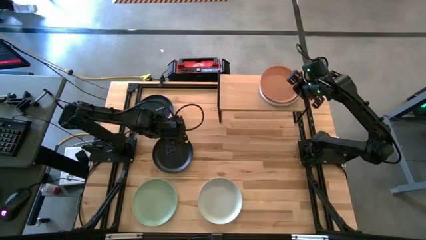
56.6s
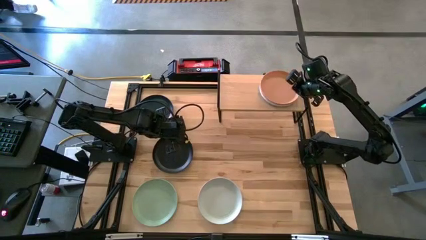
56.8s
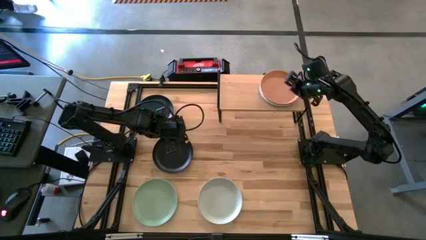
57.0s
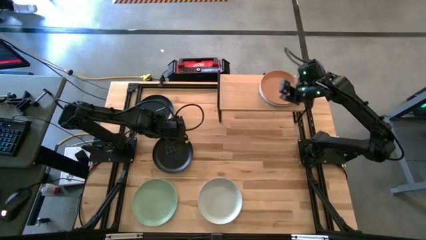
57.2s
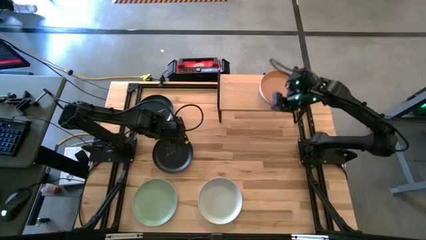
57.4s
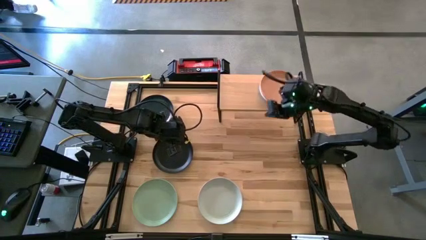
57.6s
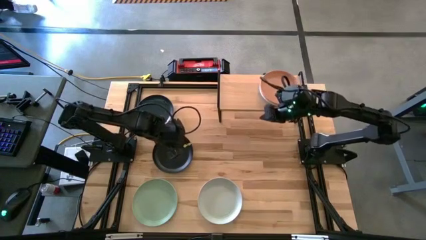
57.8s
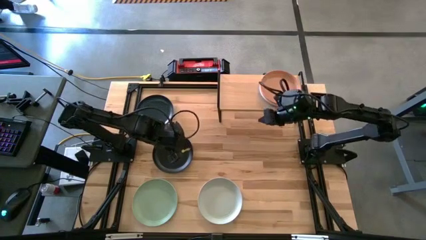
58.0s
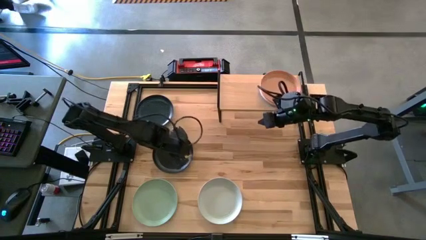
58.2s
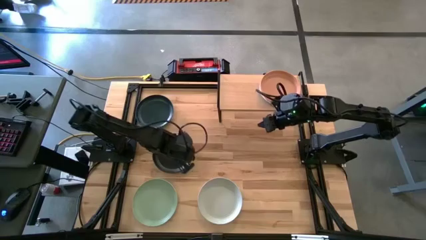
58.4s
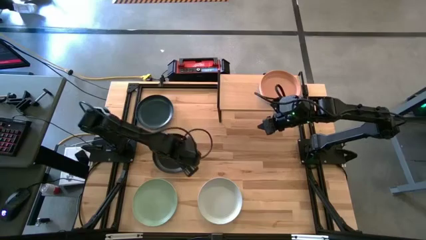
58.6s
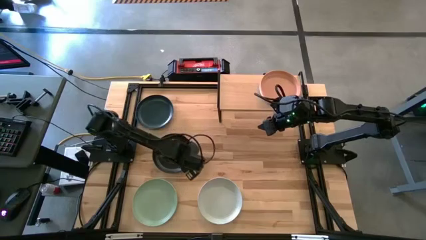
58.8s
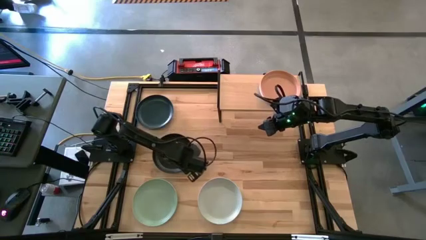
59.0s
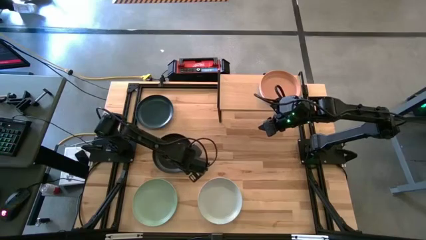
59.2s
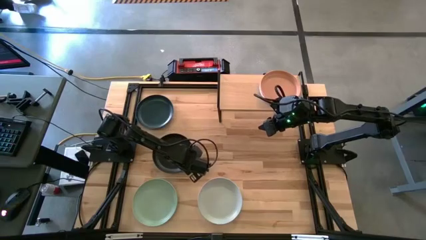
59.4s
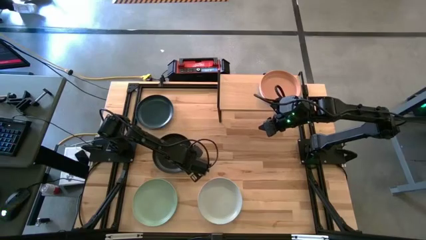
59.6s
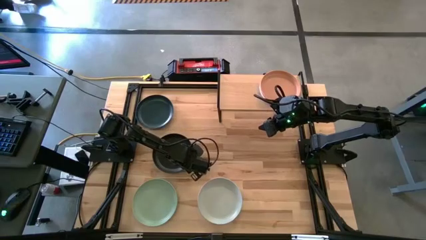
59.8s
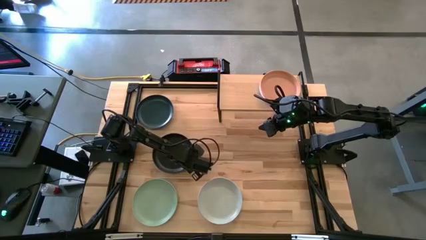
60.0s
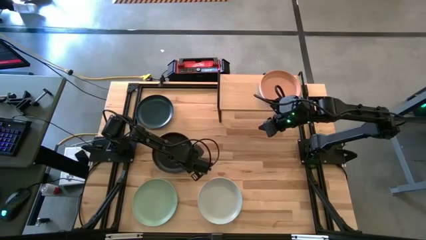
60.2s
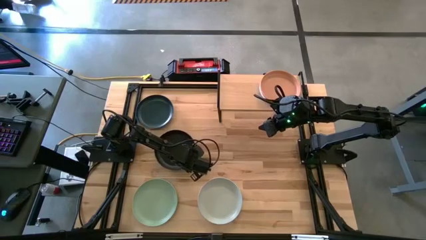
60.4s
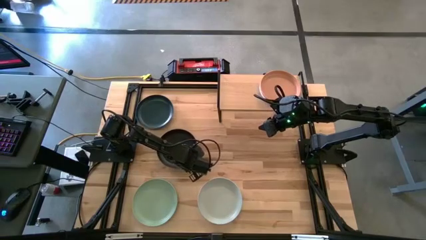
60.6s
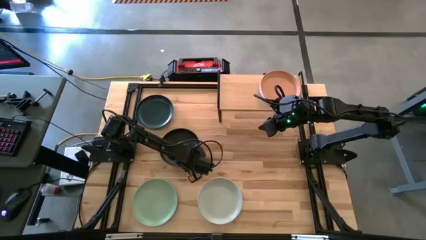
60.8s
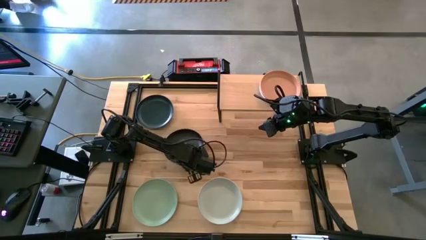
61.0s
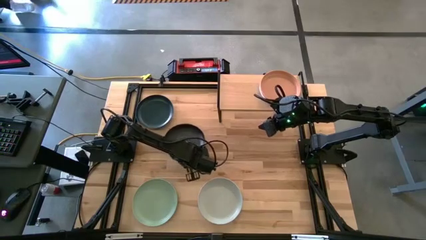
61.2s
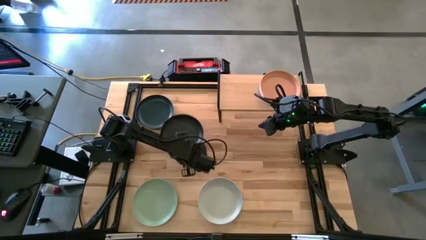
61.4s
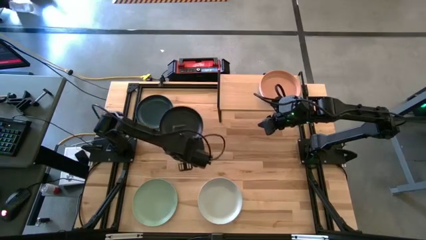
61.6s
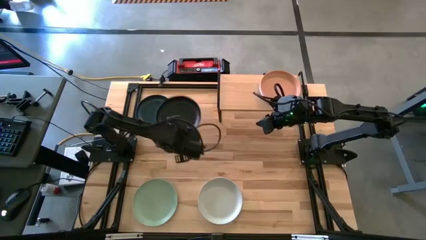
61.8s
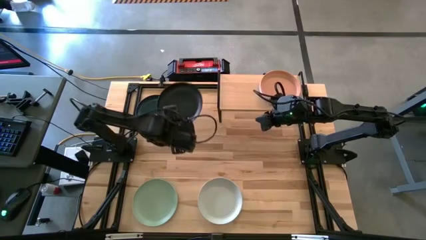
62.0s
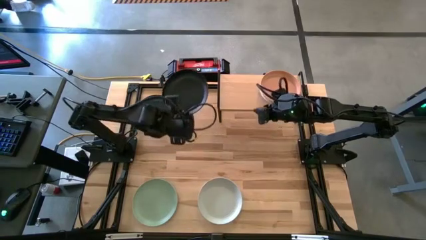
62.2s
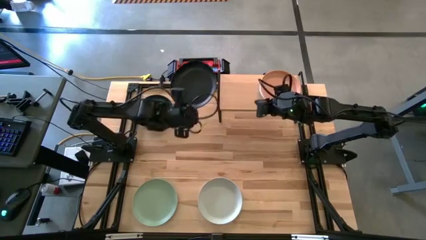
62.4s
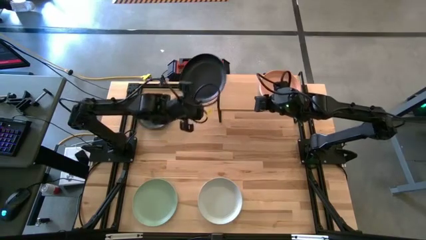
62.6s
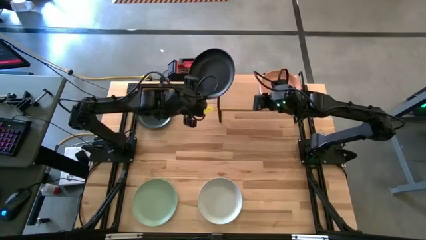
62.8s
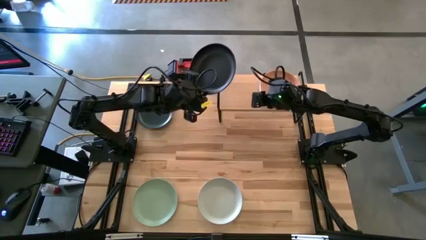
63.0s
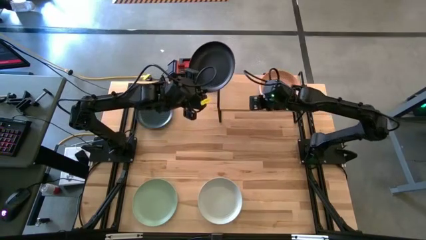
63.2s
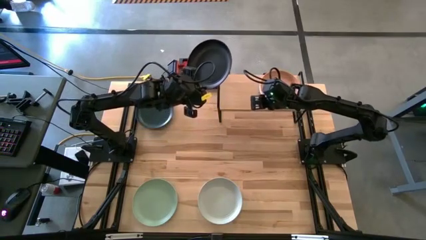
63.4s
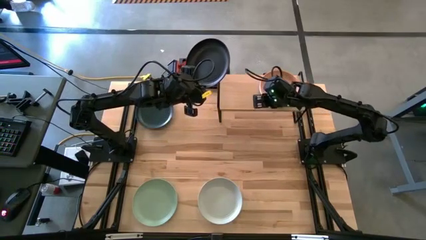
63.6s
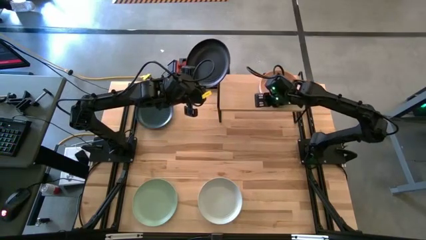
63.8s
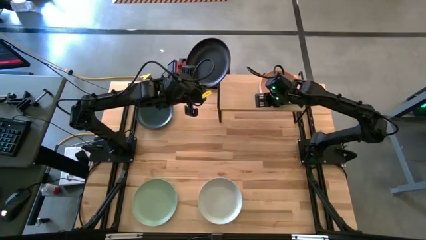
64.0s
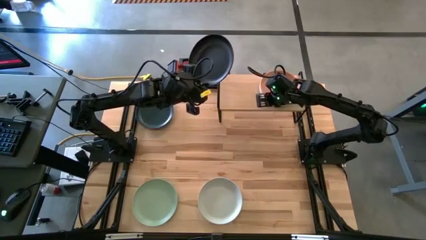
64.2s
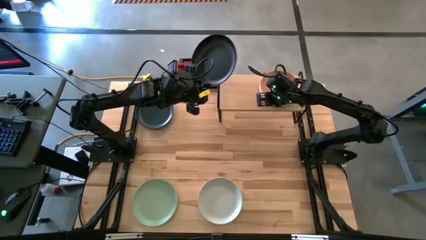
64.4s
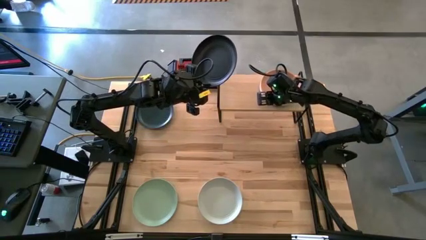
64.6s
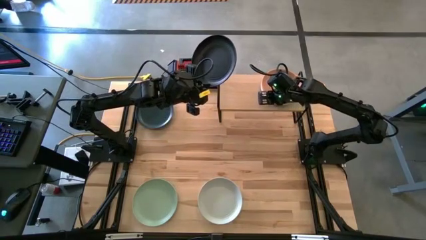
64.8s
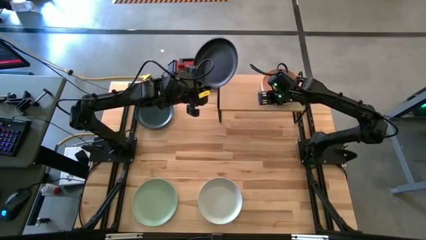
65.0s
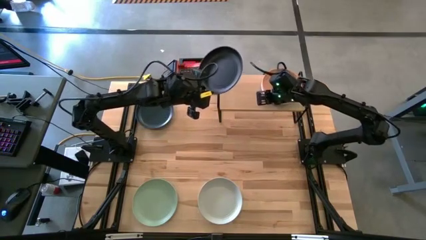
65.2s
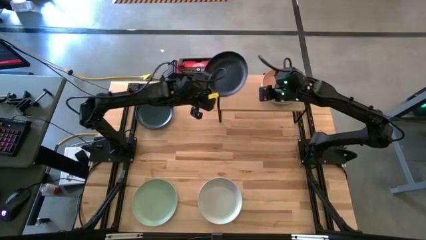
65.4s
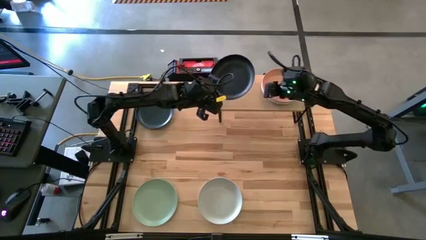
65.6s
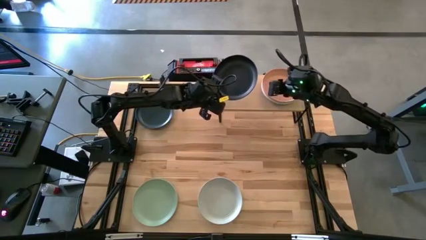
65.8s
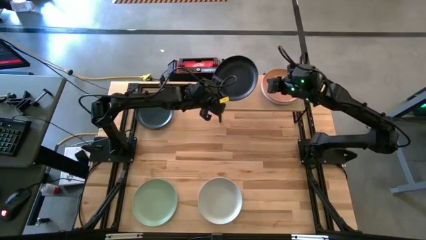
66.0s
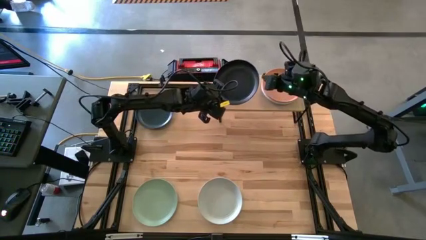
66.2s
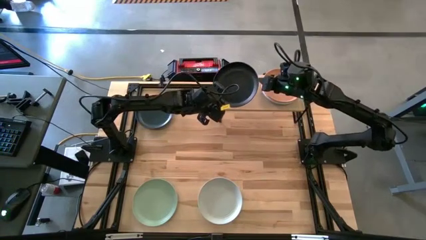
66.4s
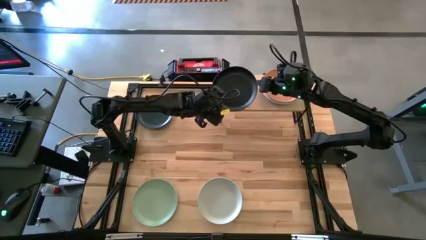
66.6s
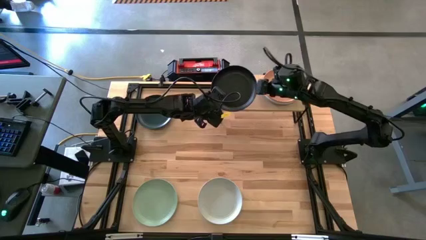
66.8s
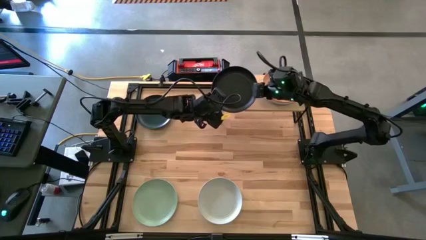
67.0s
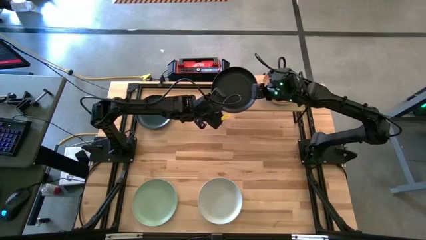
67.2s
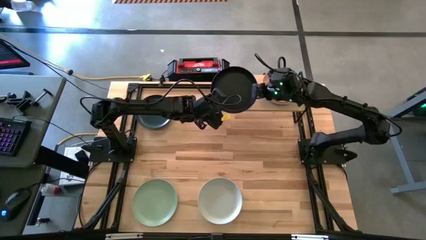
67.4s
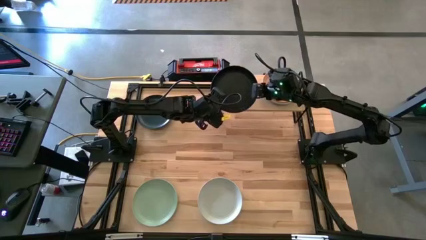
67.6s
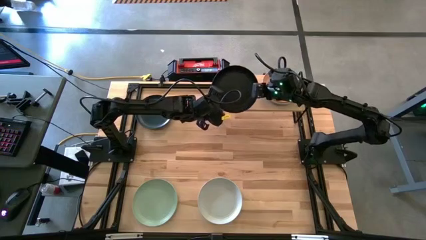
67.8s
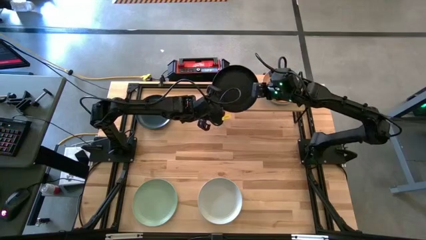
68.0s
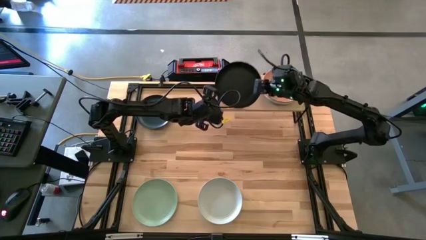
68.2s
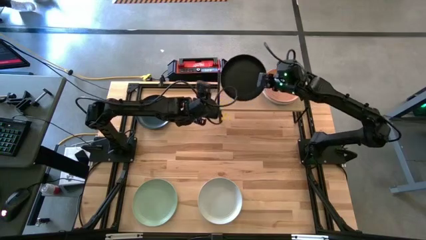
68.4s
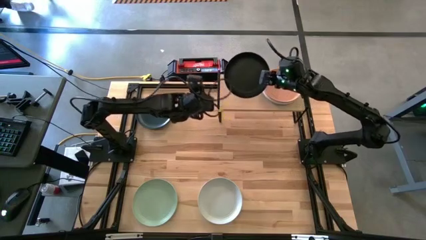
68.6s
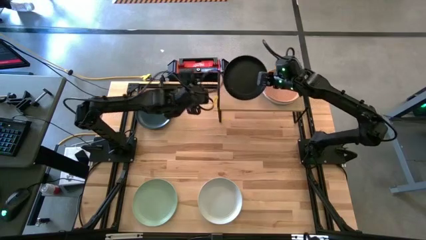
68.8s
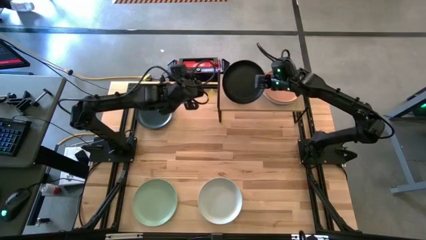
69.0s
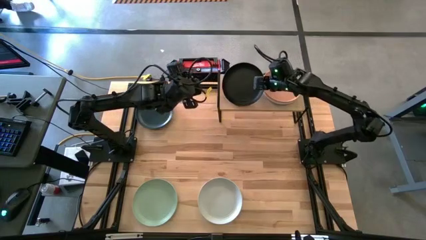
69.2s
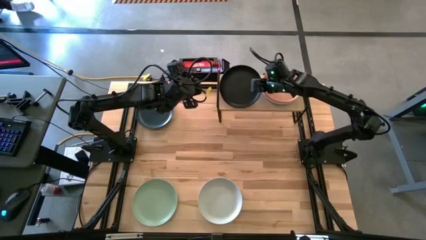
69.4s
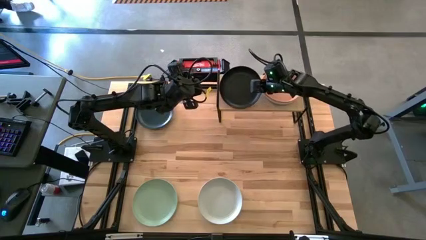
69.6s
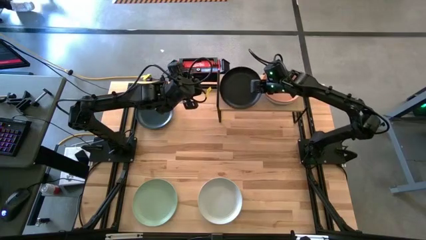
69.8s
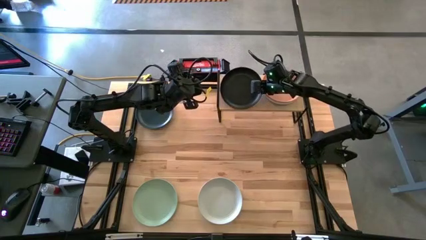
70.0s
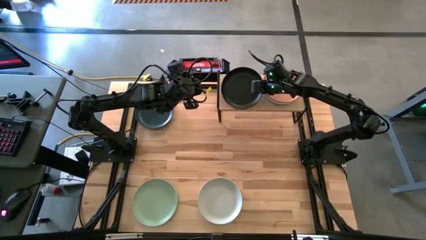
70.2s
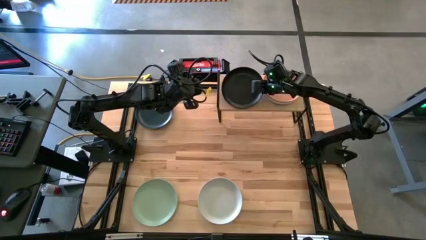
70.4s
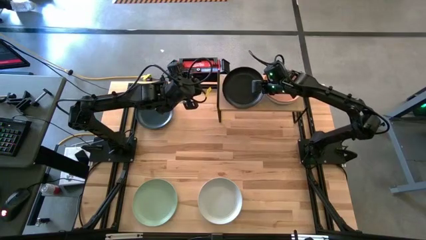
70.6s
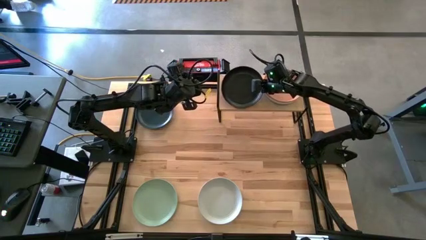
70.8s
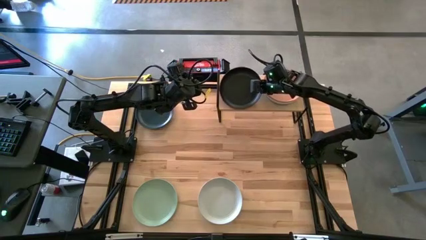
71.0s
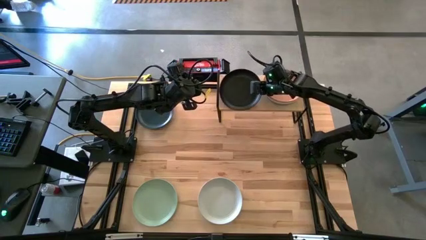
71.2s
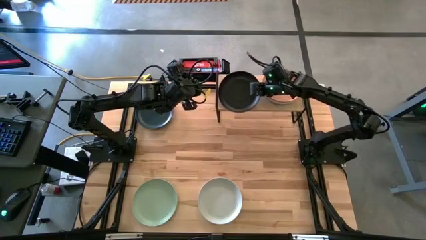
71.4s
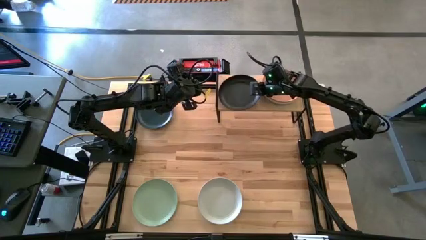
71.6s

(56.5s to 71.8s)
Task: Place and stack plates onto a shelf
Put the bottom black plate on the shelf

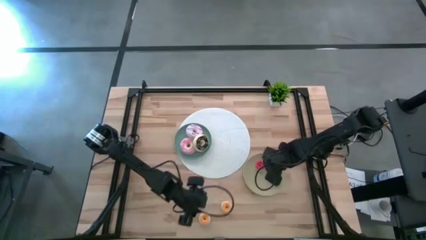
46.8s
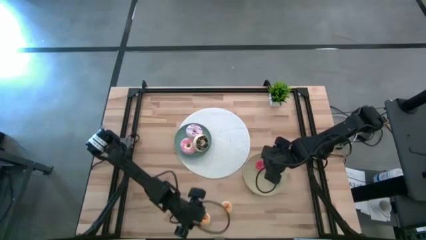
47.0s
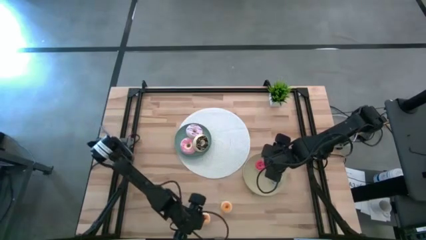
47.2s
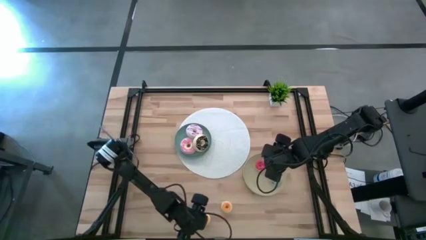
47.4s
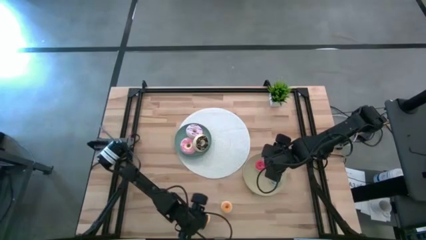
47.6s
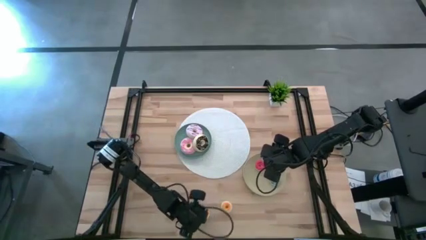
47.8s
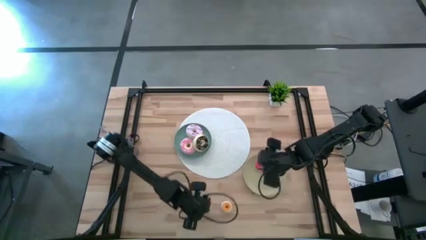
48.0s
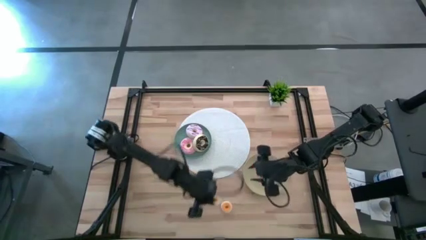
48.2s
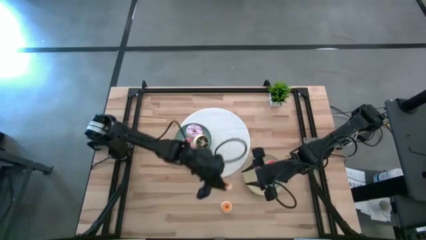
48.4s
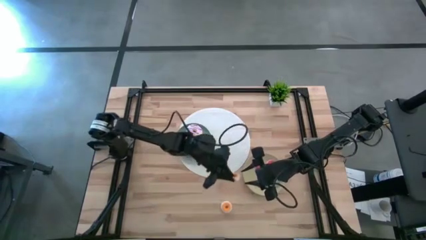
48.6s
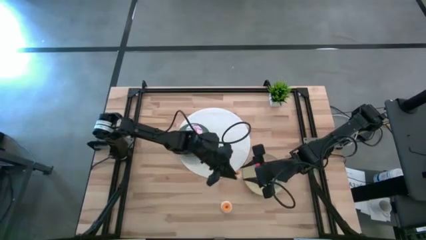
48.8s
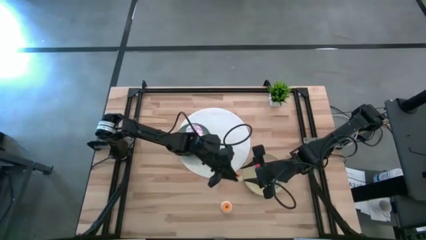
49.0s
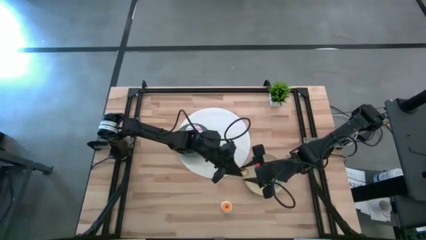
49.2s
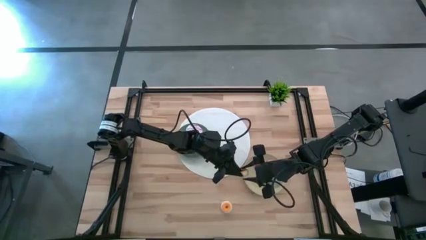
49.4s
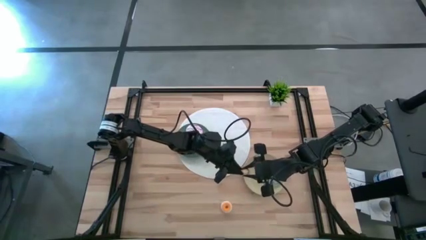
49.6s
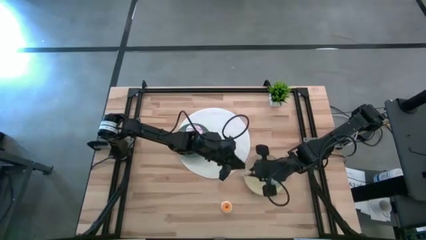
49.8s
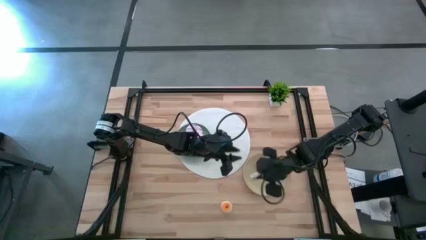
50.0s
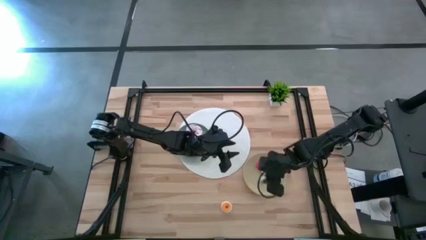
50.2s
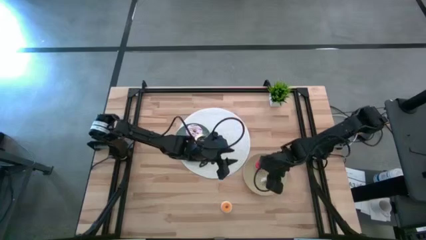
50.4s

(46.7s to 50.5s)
Task: Pick & Place donuts
Put the small white donut on the brown plate
